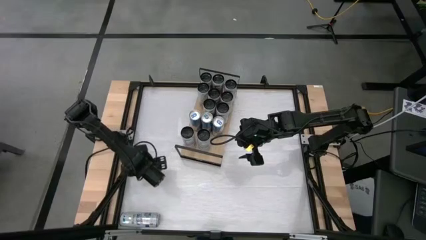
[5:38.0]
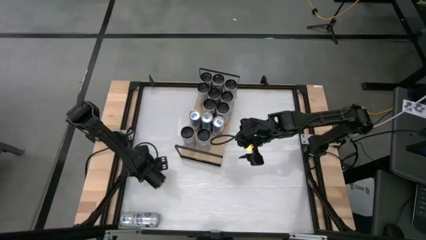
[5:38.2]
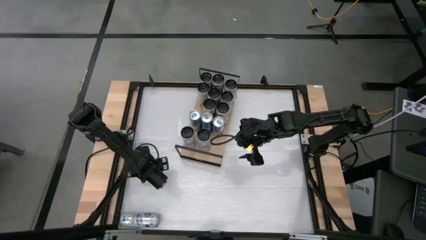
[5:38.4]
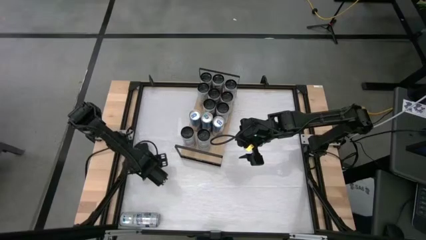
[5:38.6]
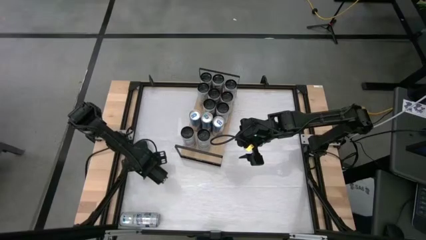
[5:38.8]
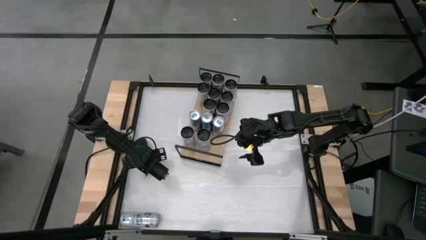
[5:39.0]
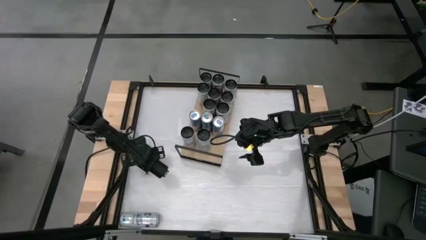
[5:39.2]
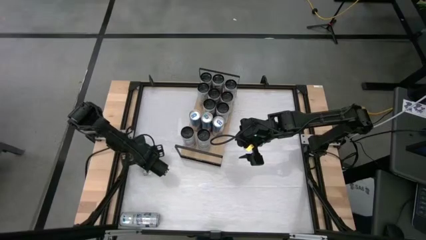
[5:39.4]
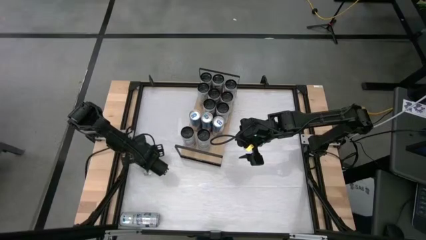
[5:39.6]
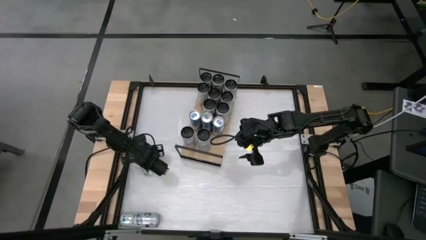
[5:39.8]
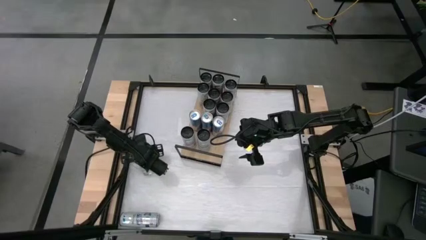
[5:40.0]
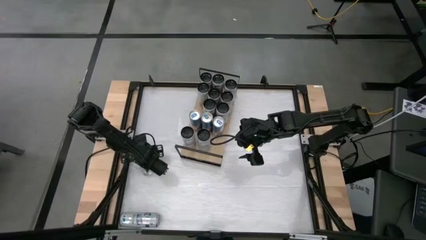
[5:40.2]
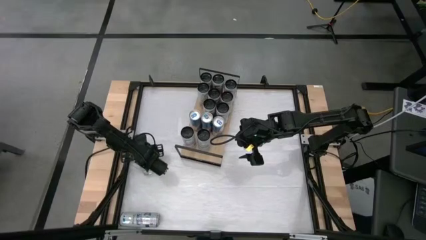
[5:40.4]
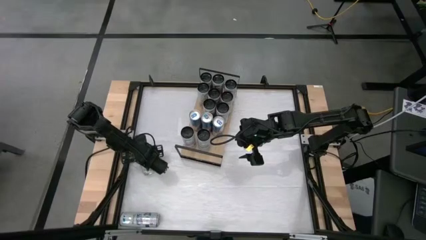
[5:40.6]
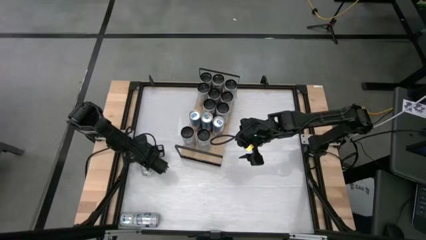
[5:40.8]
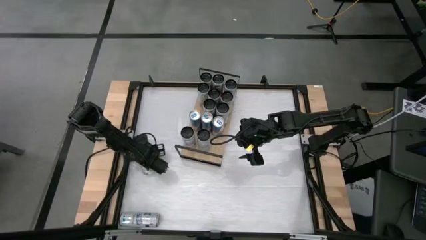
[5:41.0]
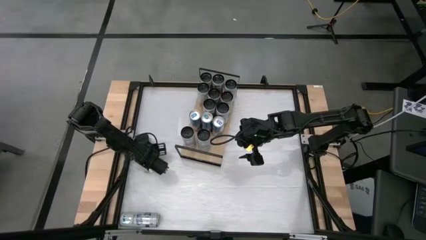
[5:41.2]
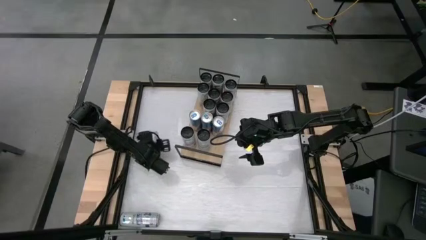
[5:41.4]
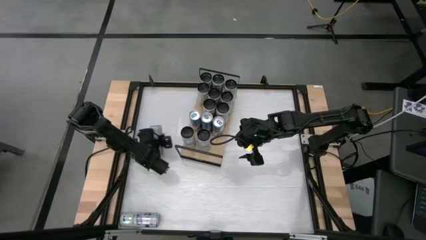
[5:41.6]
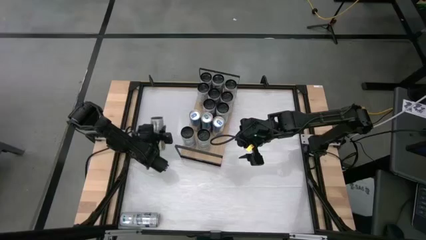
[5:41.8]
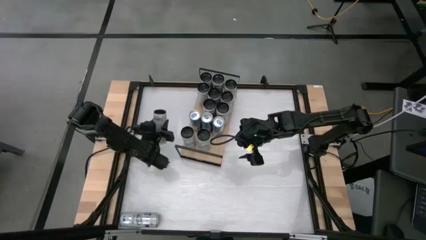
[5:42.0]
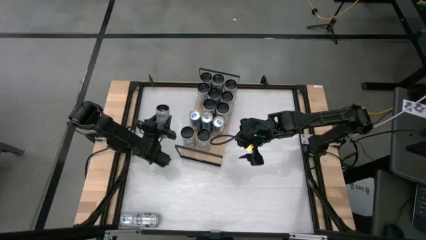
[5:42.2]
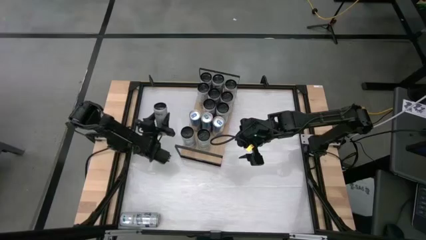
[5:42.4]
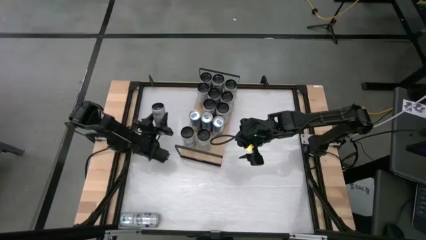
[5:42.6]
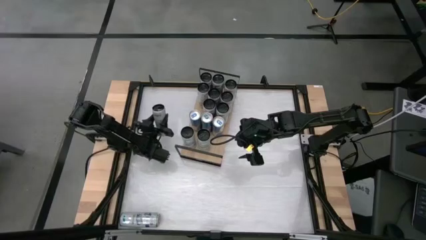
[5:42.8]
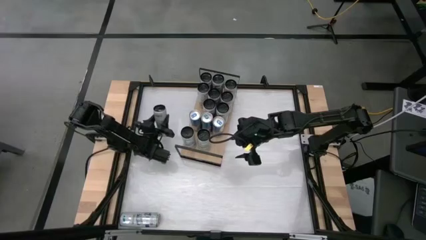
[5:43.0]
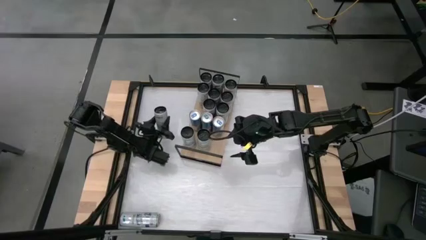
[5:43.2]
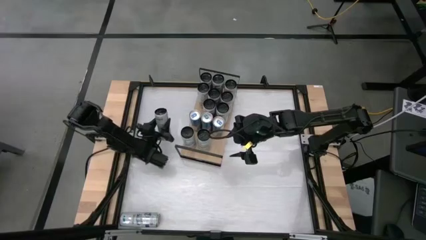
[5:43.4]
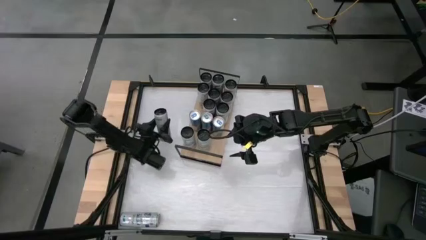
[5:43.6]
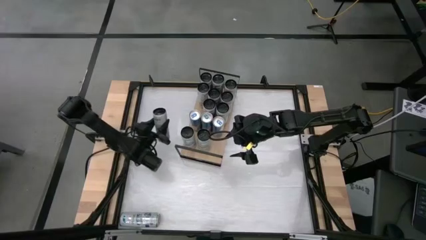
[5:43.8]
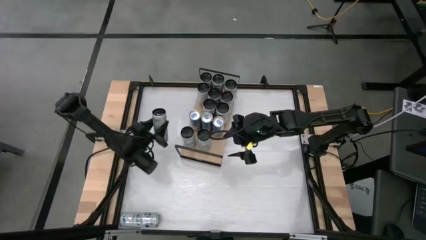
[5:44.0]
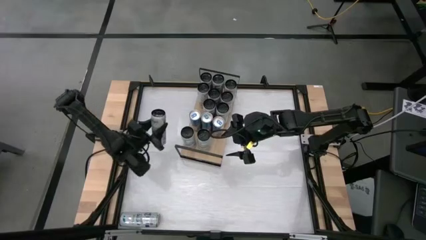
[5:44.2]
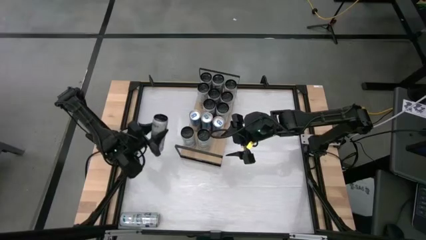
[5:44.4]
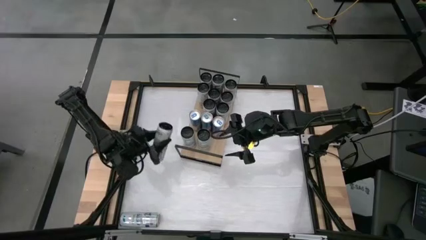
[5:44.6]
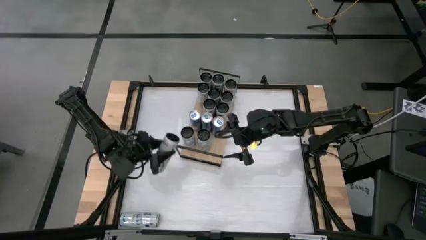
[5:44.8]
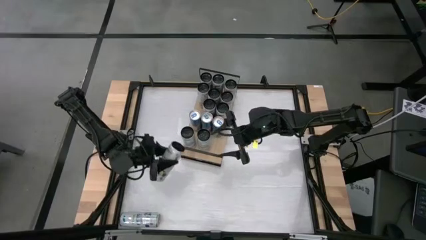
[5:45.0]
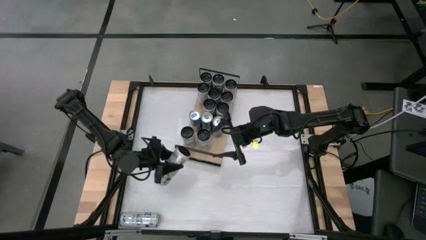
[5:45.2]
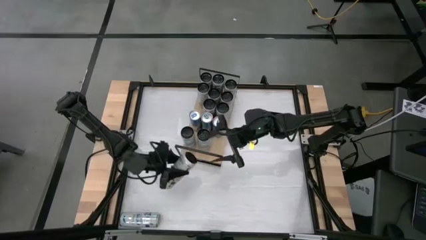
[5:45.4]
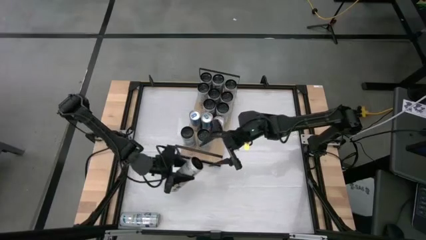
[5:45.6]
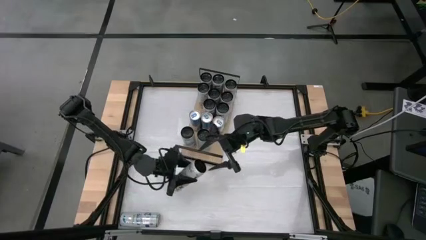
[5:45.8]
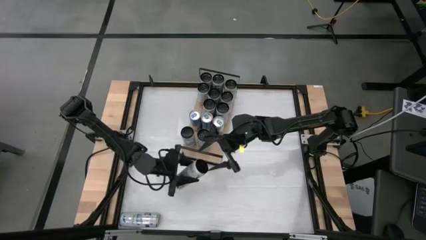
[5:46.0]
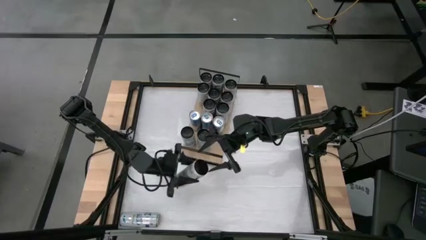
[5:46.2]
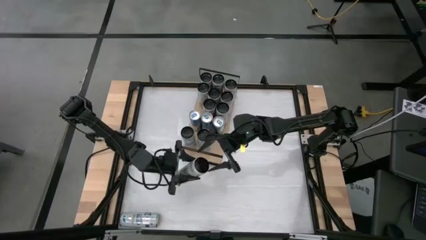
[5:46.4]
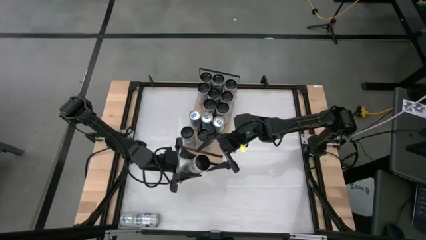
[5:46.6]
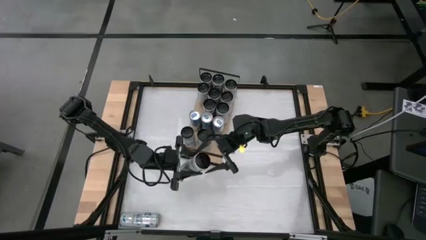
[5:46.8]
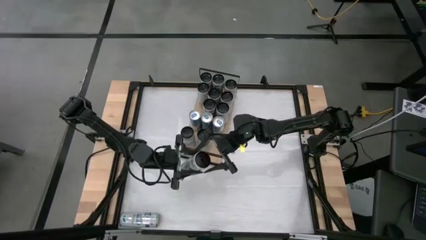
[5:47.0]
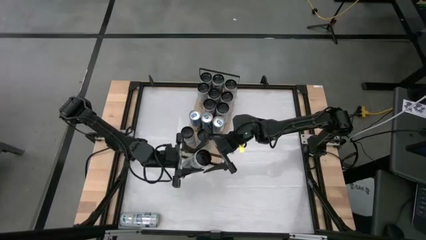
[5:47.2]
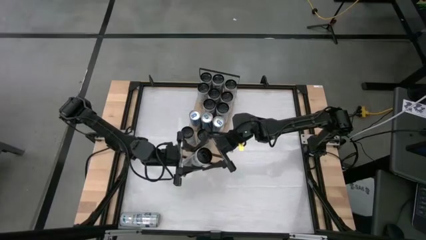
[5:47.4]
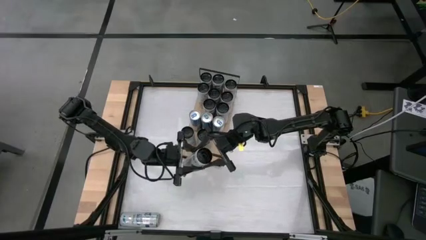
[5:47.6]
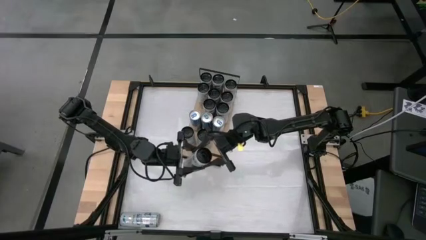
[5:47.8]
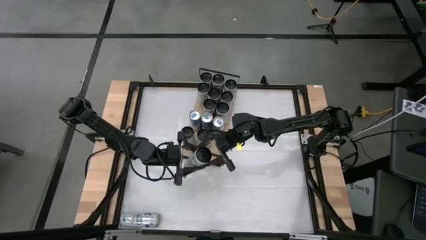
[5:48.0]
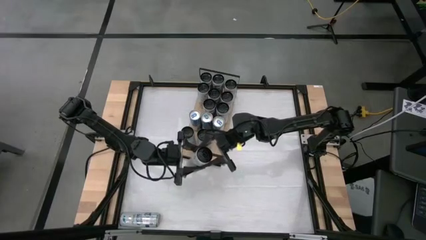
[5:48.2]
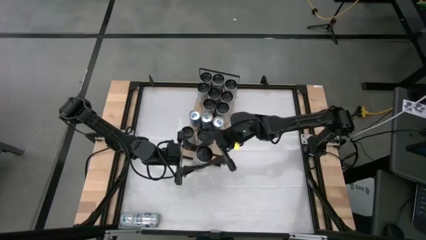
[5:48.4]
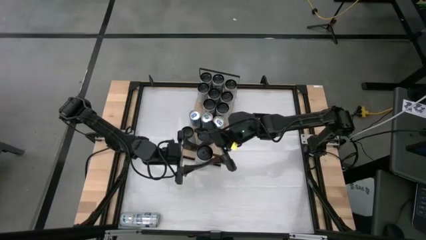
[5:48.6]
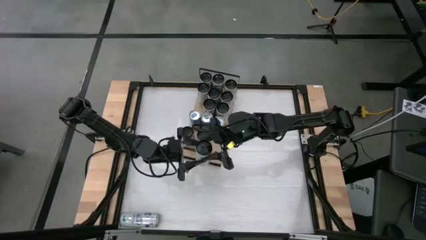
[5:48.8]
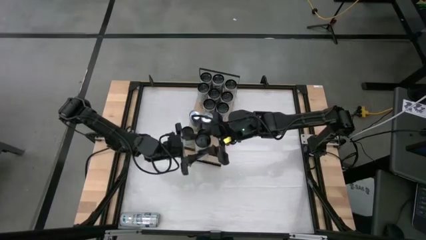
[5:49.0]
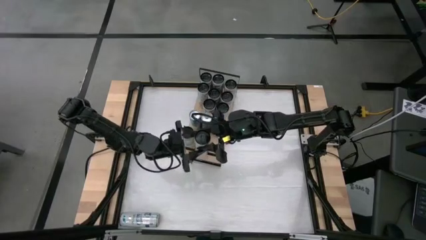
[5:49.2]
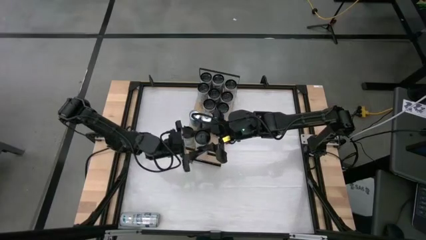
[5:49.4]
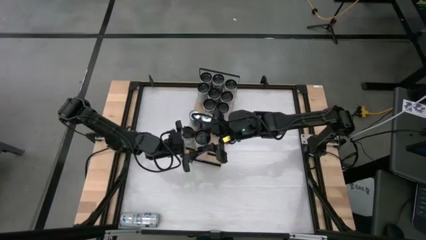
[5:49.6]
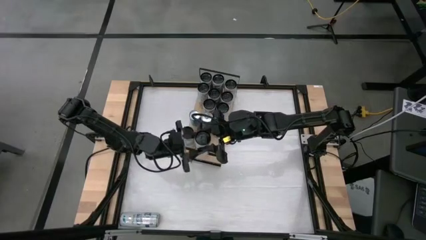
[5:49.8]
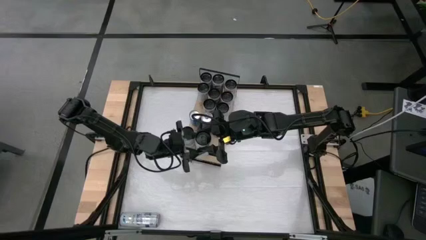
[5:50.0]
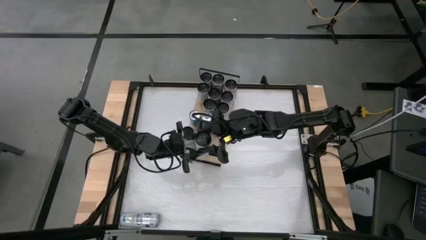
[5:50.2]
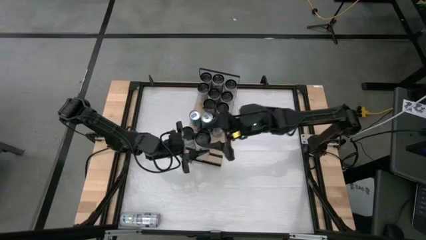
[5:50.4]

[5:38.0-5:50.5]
Task: Place canned beverage on shelf
Put the orange soda can on the shelf aligned with the other orange soda can

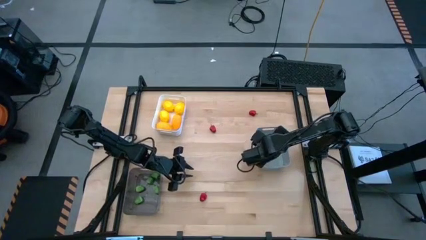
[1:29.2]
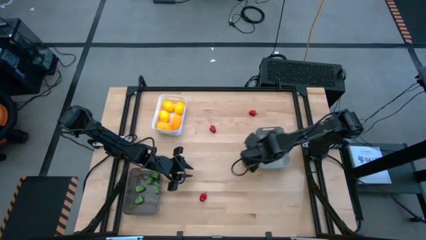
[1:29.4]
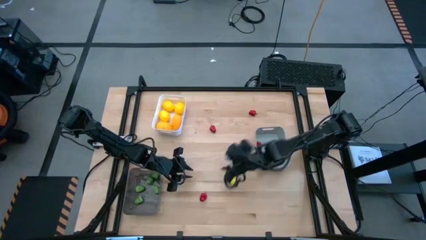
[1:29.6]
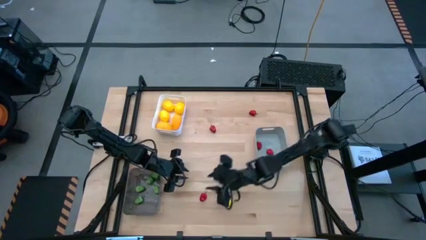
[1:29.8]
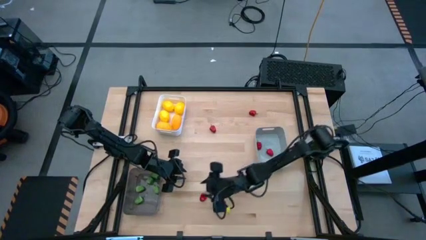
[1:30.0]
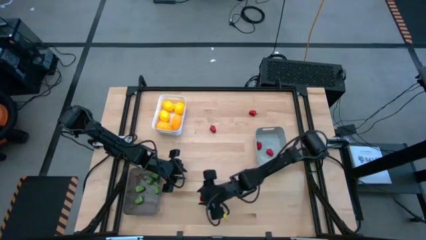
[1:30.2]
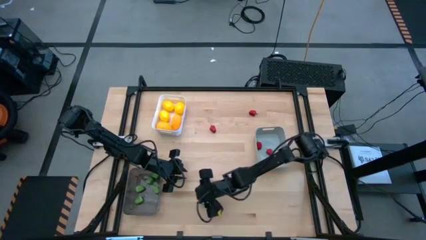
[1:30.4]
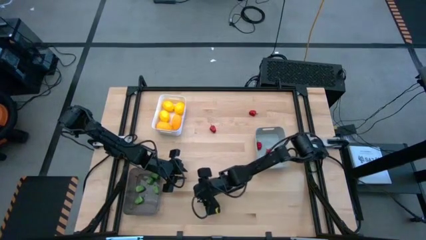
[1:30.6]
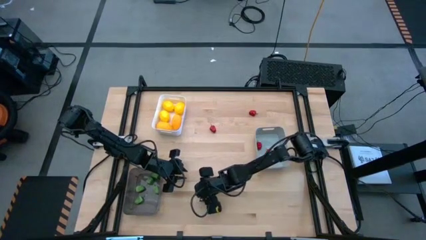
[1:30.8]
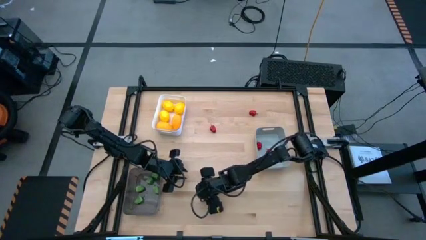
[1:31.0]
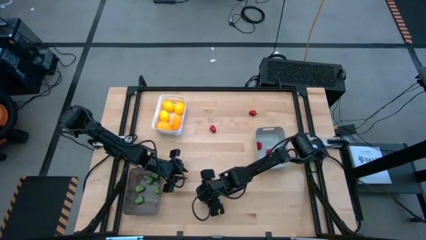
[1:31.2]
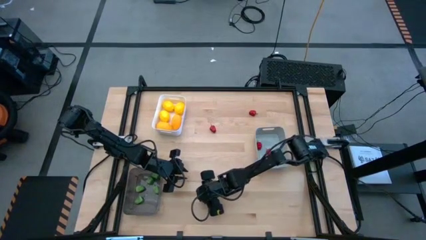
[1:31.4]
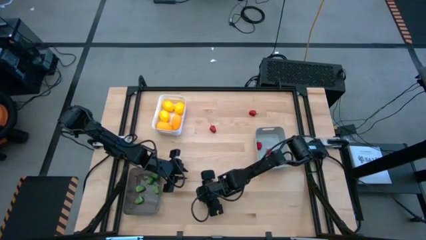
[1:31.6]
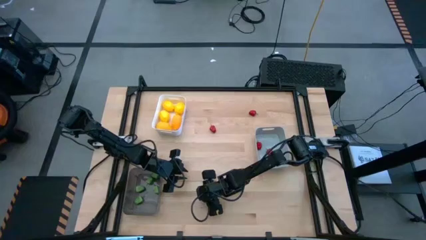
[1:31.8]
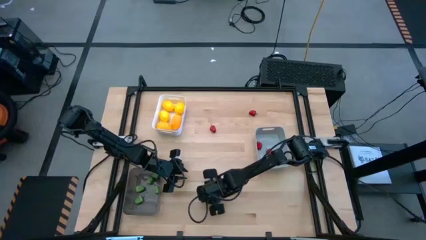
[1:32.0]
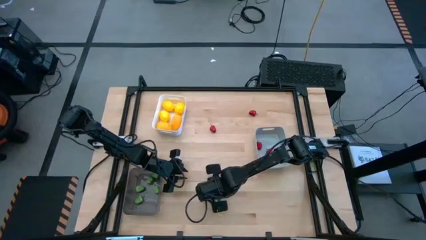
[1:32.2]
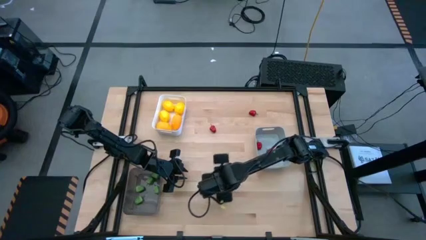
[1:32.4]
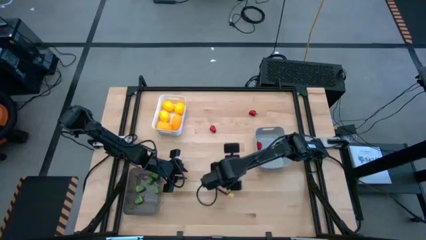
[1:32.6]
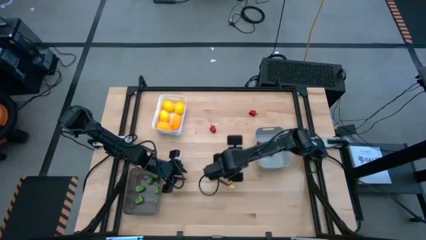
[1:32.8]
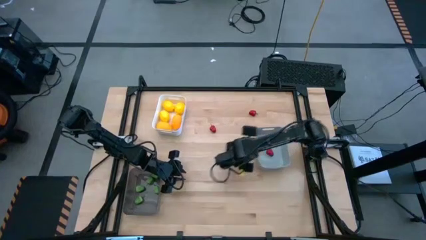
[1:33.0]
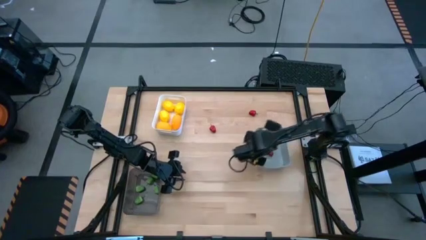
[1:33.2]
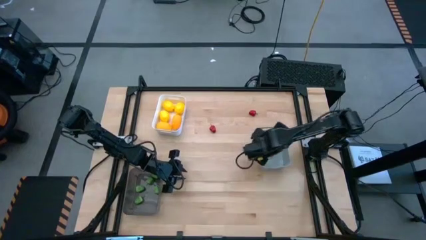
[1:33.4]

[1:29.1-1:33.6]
Task: Sort produce into baskets
Put the bottom left red chili pepper into the gray bin

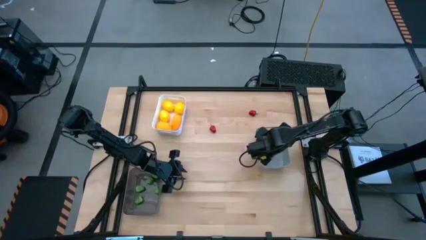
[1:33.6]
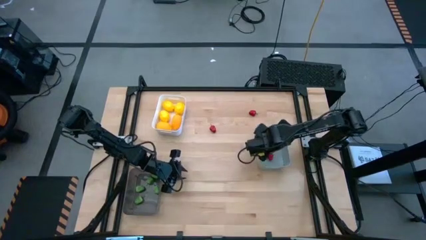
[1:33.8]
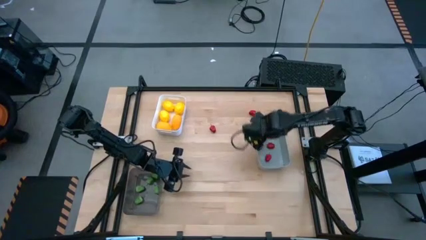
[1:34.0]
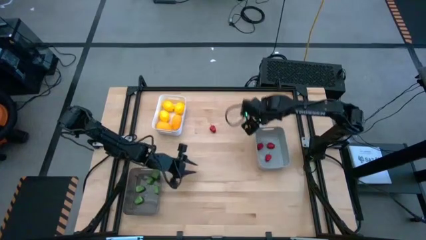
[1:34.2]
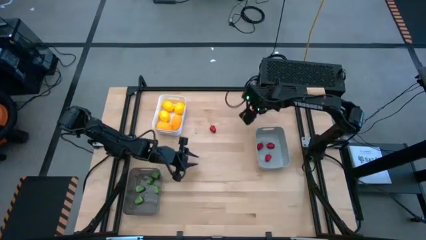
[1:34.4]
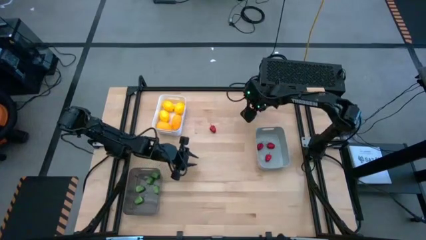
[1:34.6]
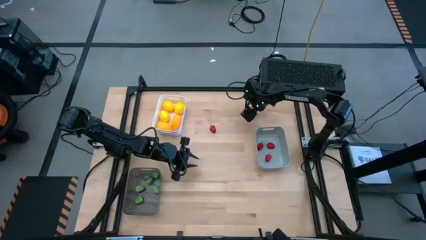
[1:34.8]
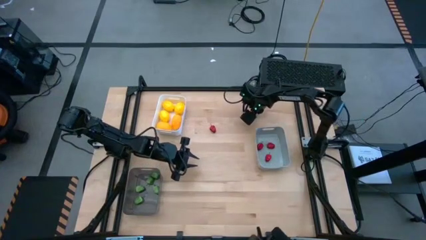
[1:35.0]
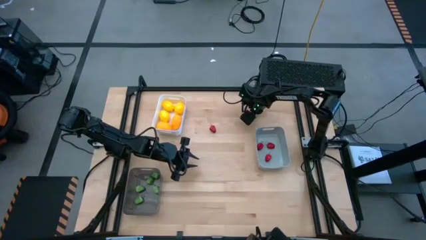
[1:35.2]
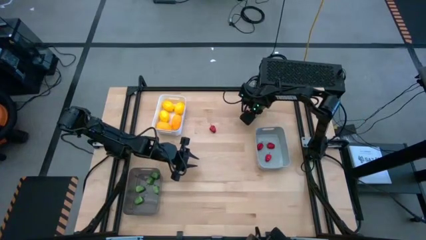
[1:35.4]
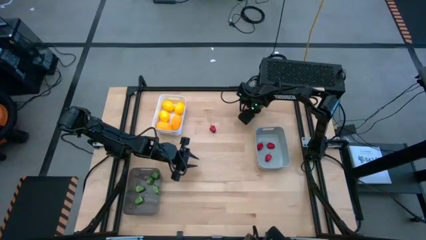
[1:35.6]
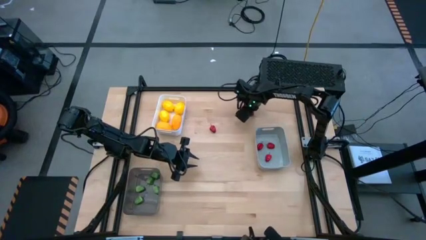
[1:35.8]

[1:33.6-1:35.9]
Put the right red chili pepper into the gray bin
